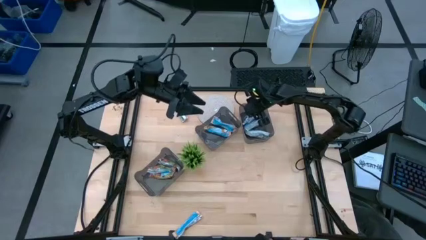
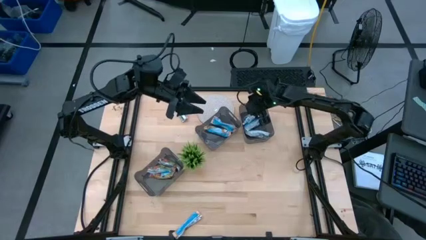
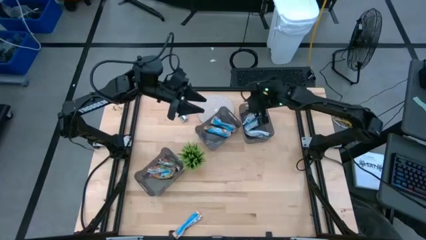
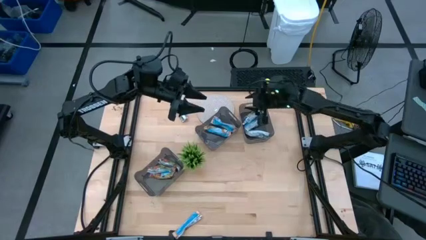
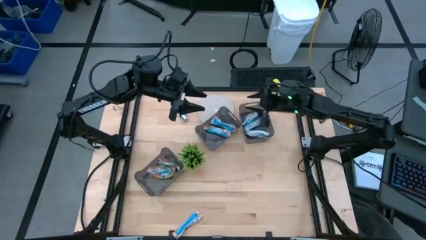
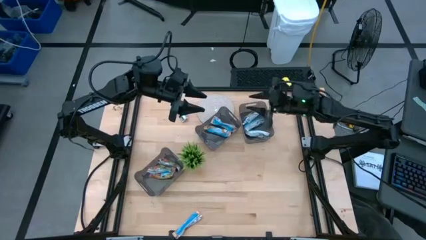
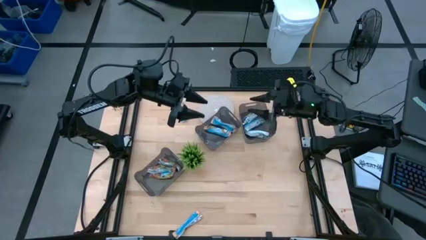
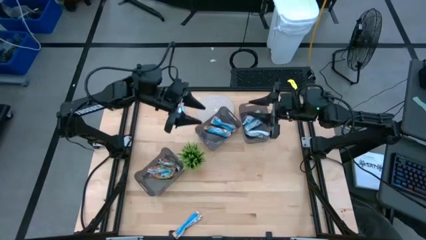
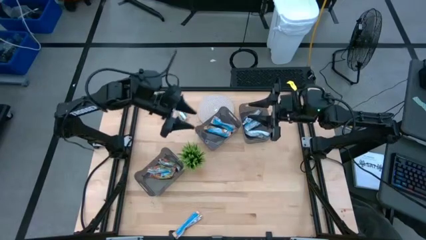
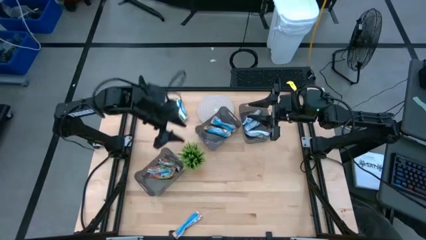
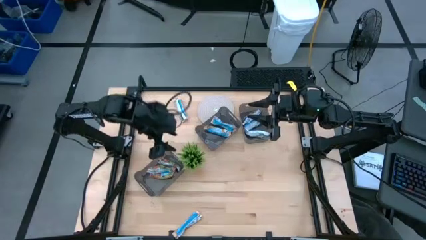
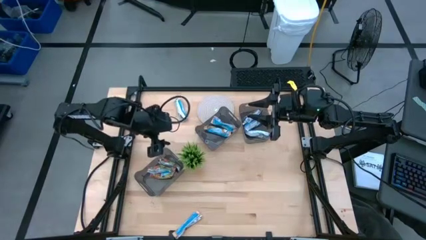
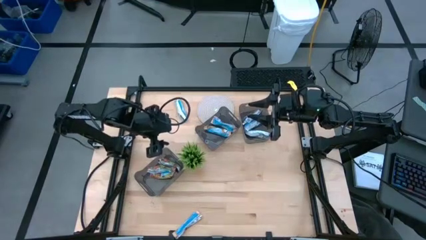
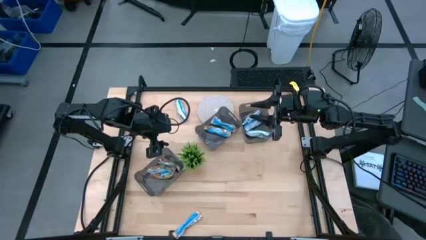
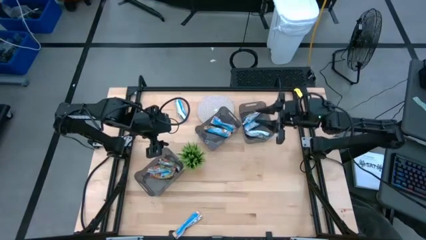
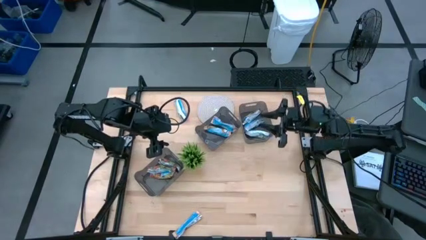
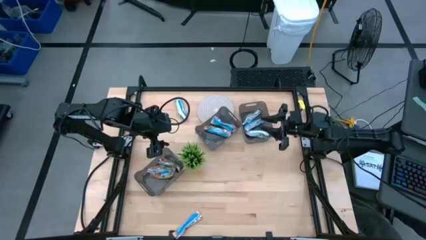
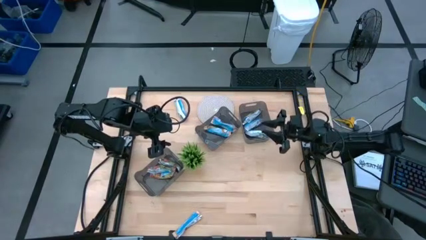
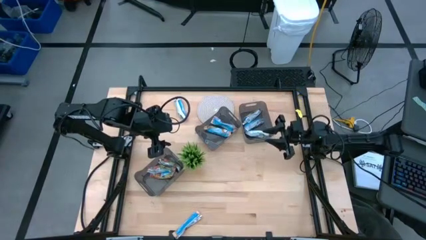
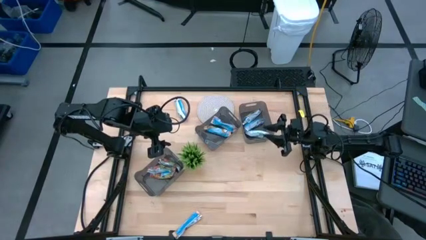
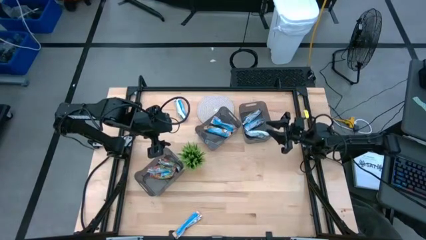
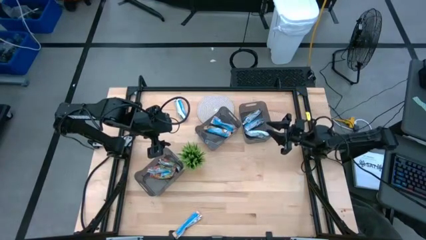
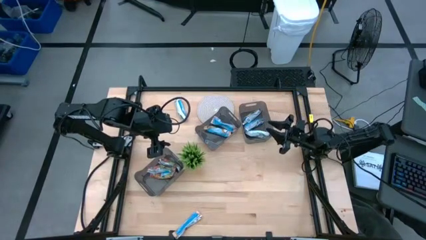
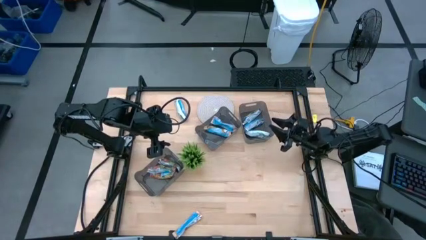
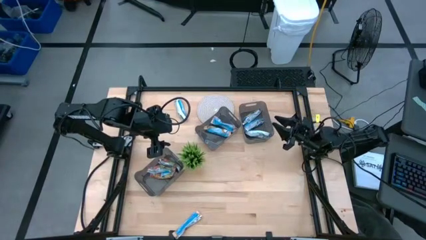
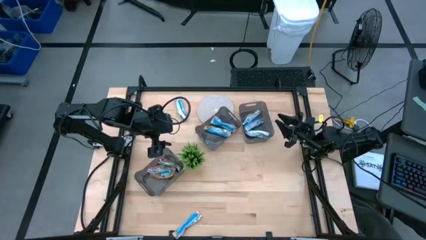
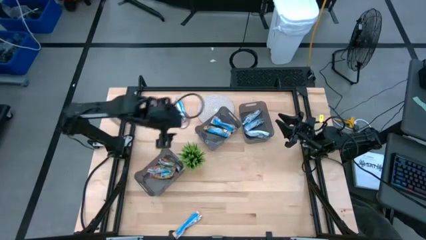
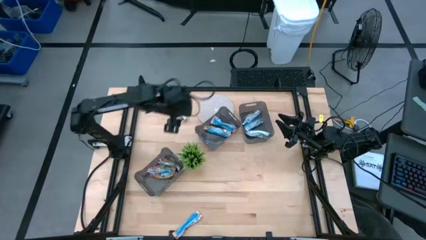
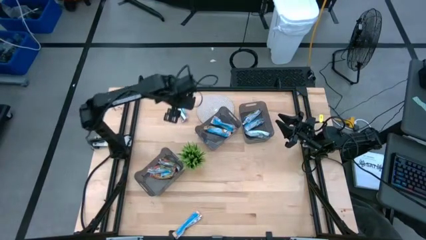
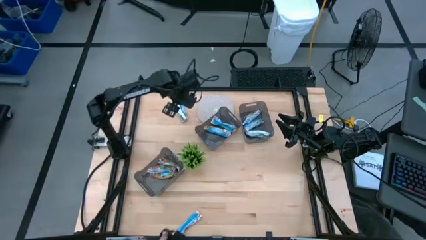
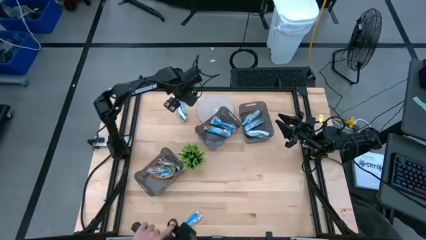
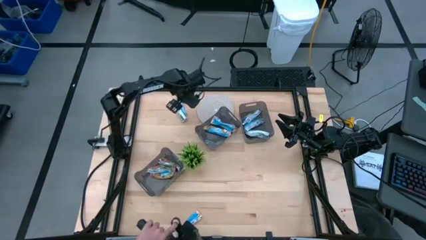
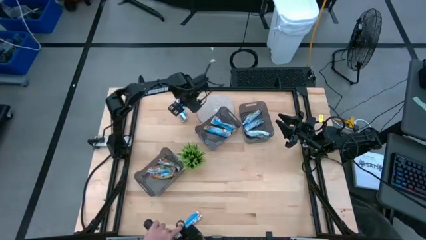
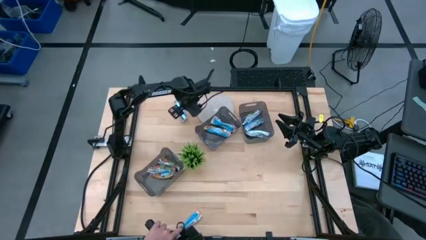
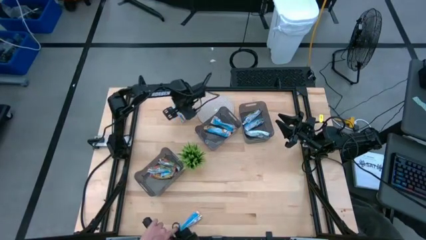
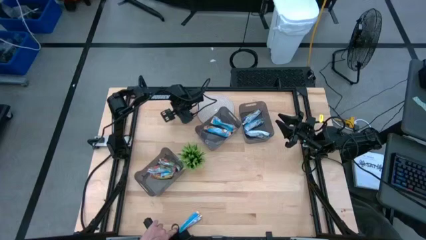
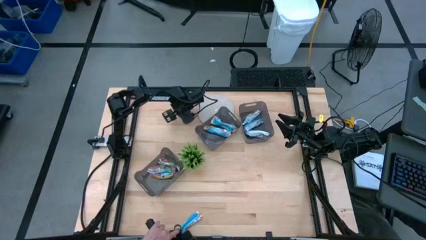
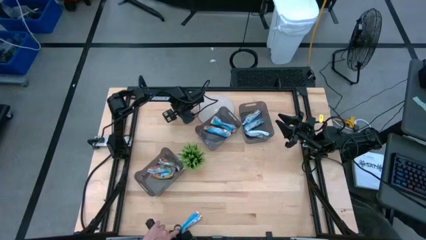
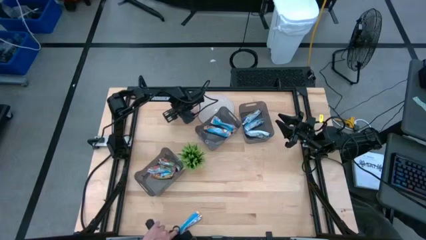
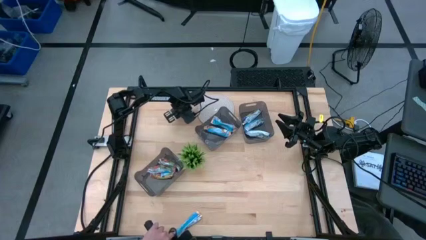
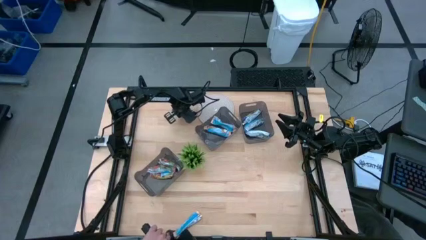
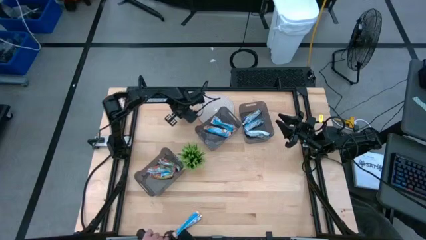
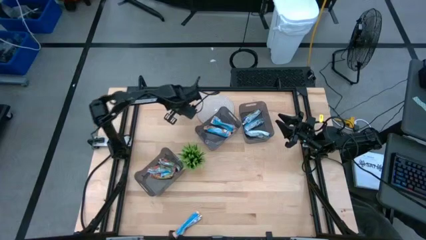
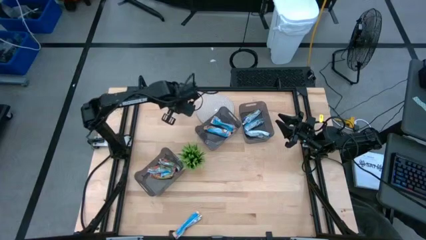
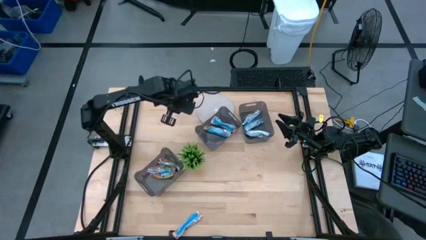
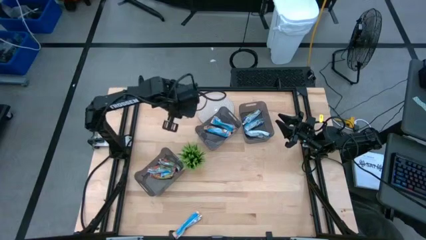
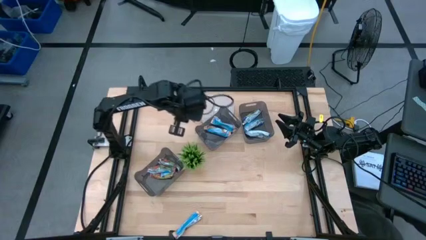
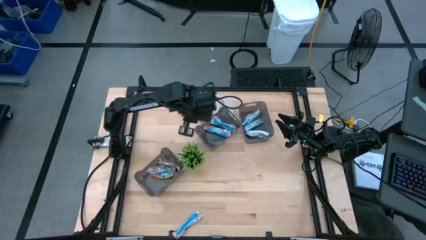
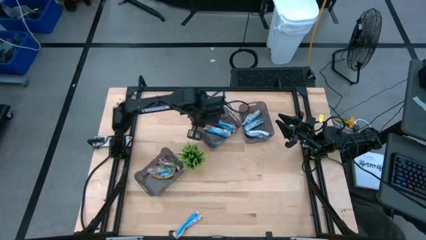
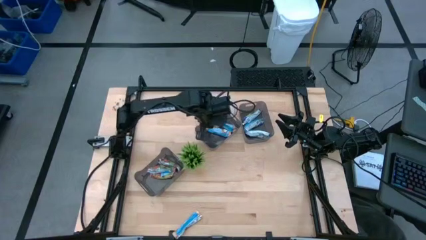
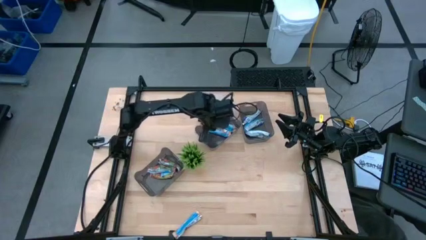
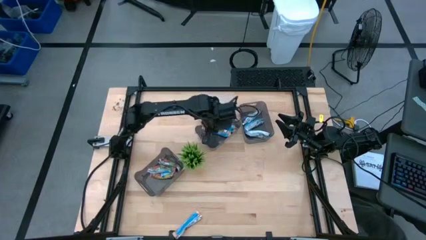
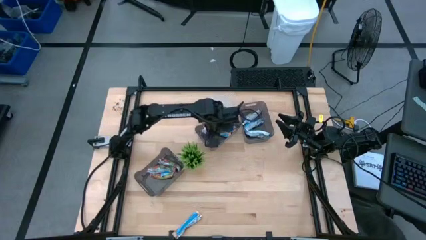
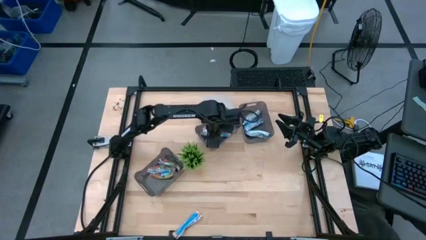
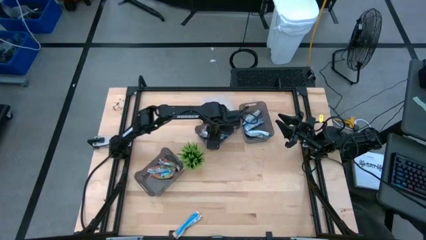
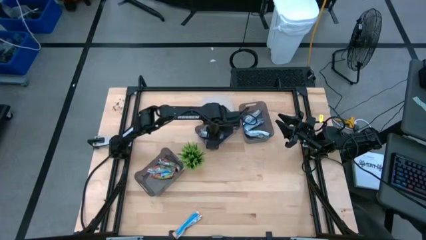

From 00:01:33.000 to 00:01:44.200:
Task: Pick and place Granola Bars by type
Put the yellow granola bar into the top left black bin

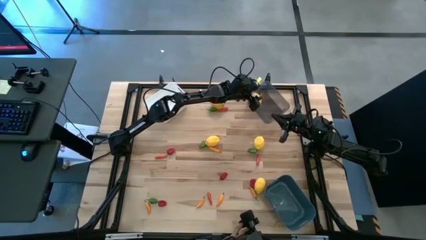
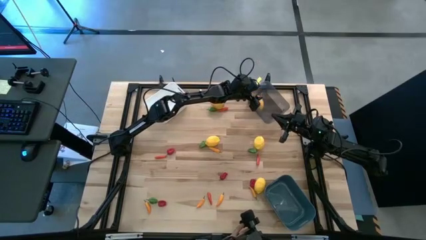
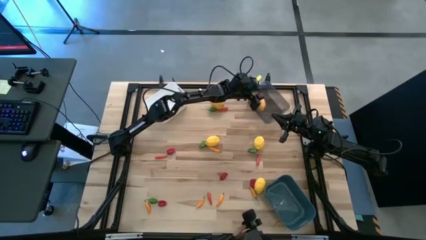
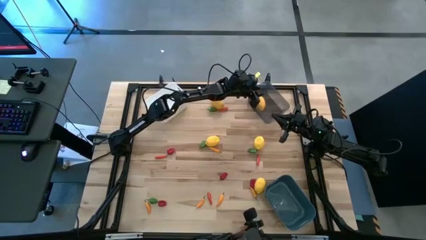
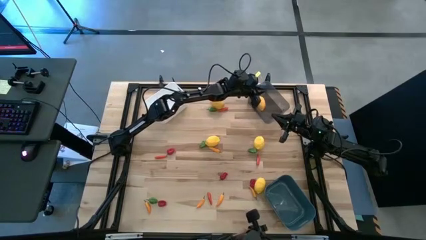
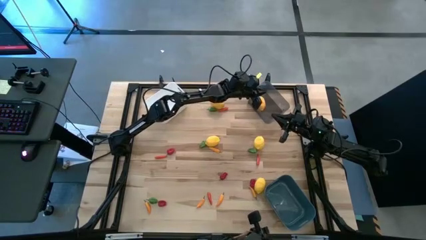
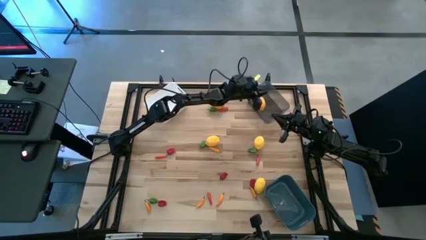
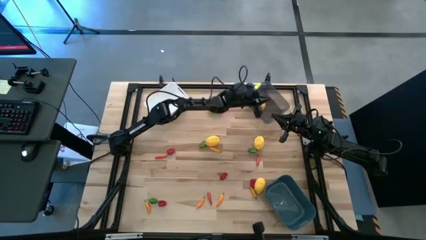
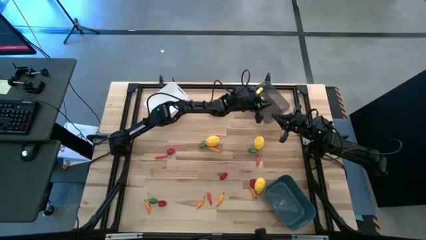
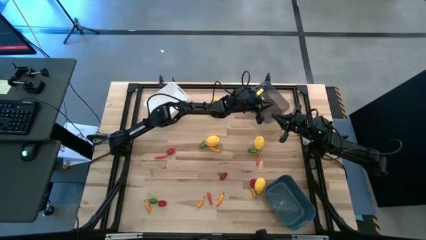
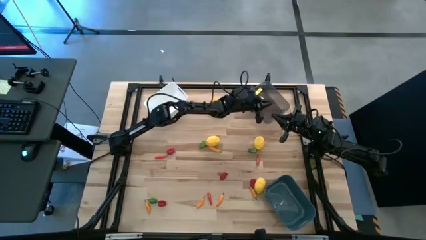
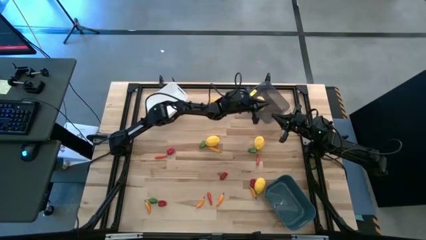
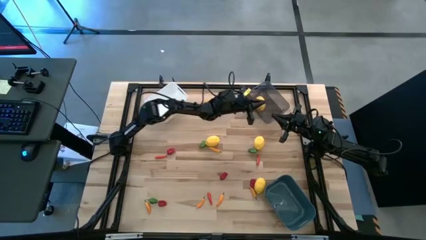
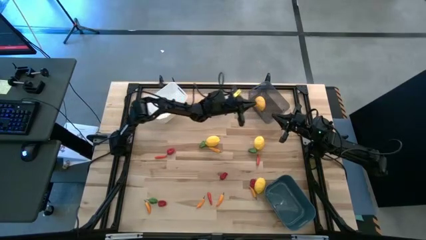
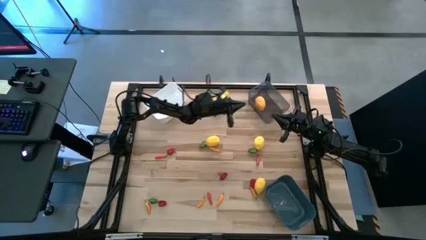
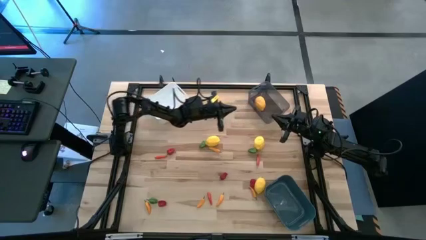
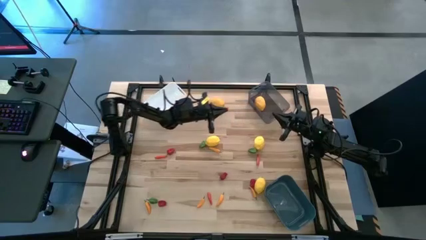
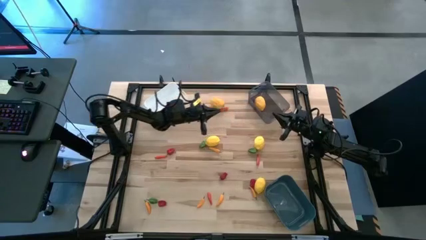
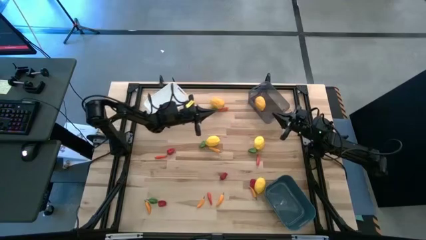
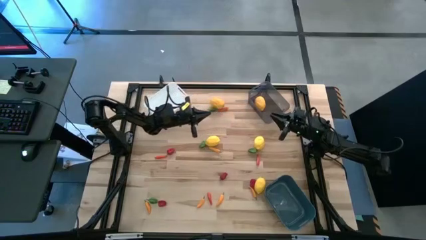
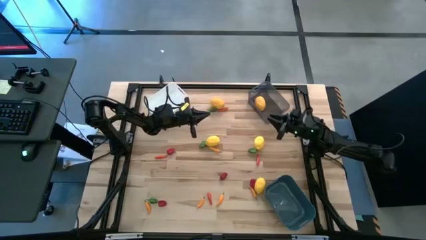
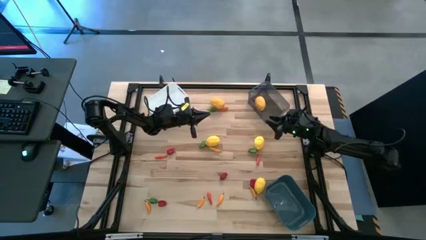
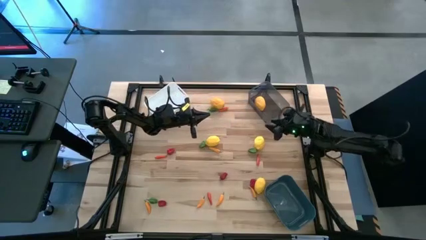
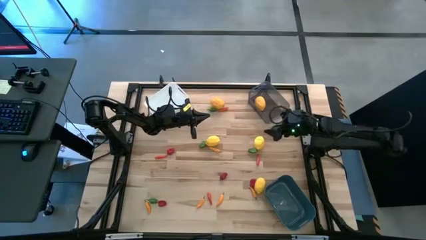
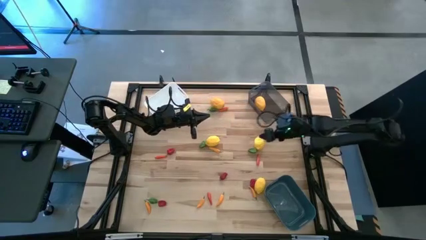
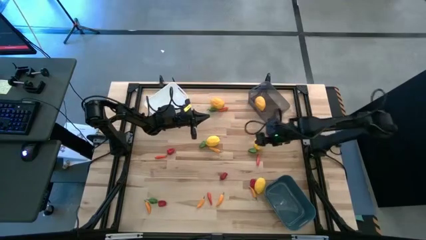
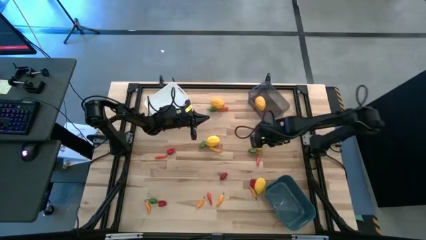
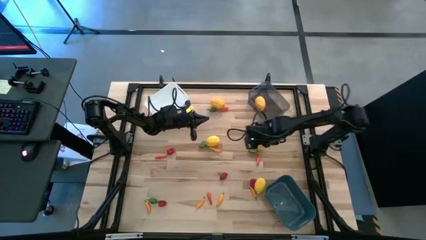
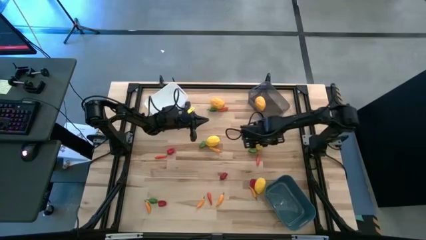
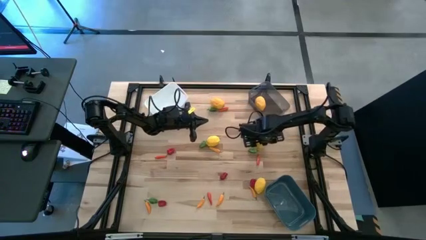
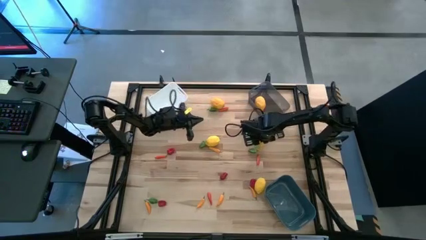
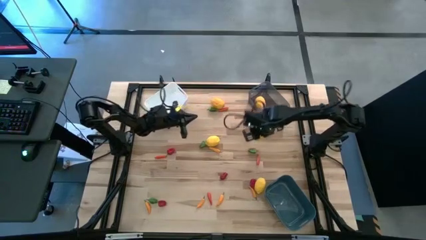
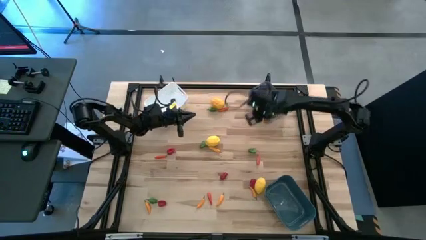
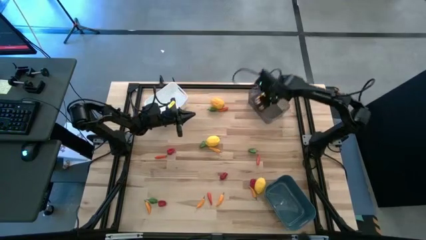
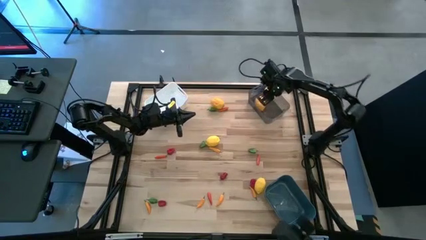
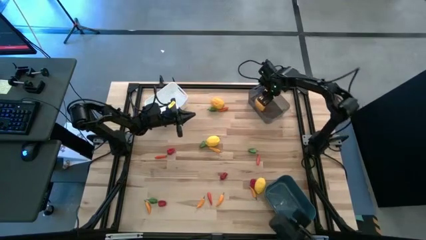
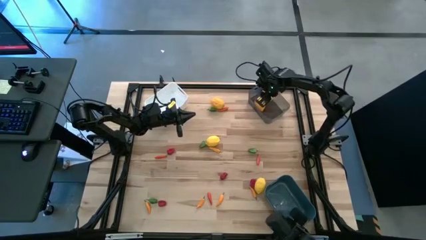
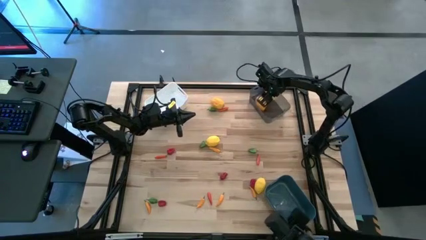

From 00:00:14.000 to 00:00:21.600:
Task: Sort produce into baskets
Put the lemon into the black bin
